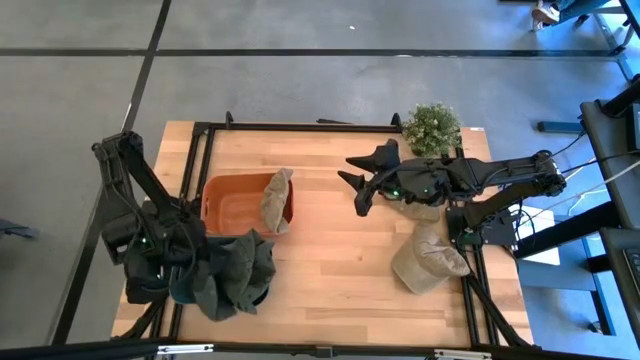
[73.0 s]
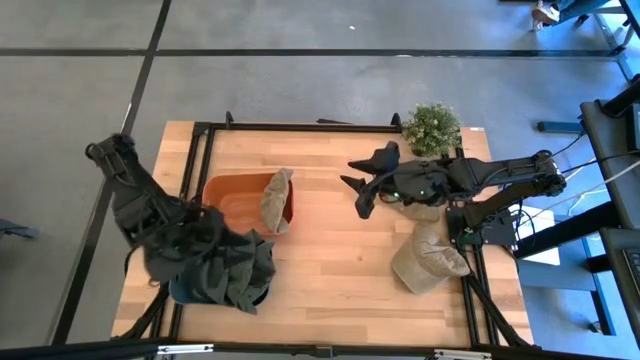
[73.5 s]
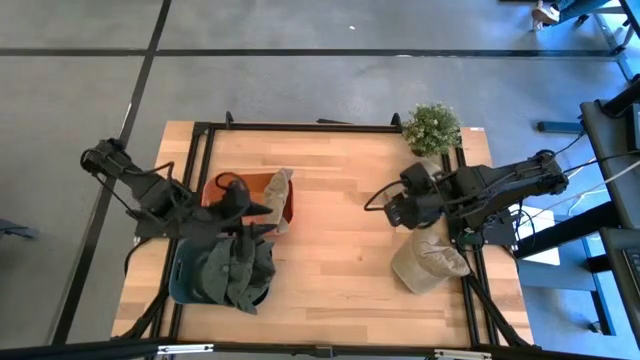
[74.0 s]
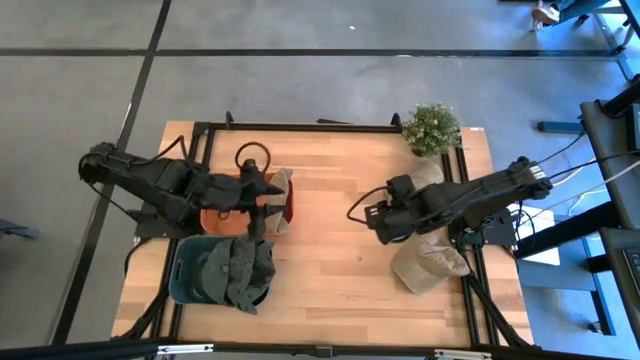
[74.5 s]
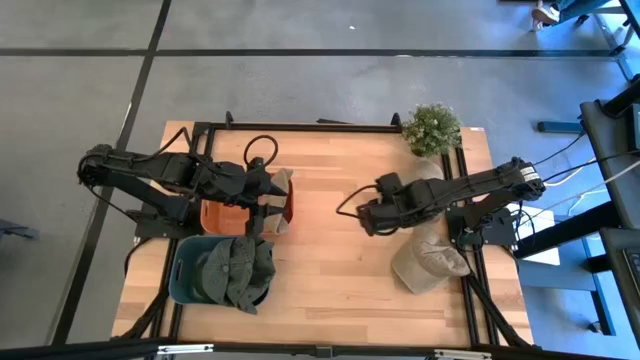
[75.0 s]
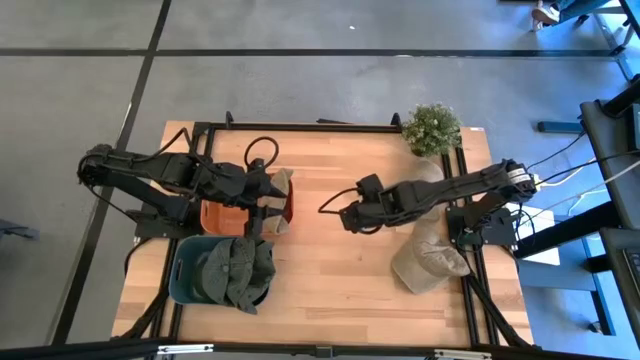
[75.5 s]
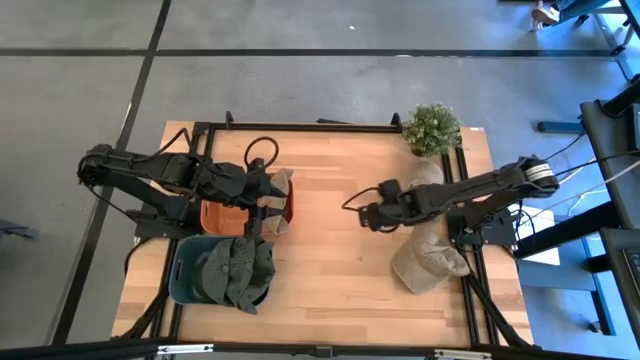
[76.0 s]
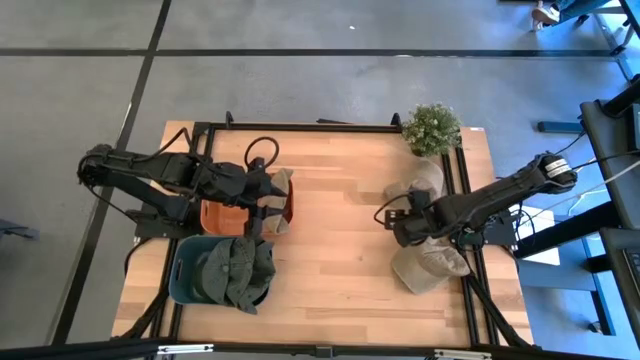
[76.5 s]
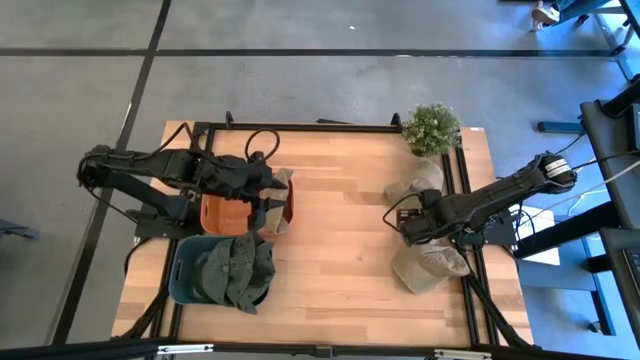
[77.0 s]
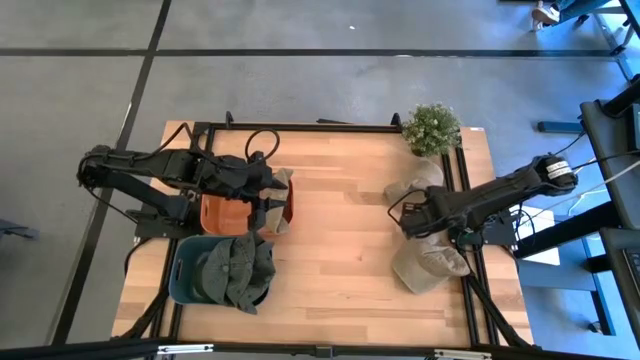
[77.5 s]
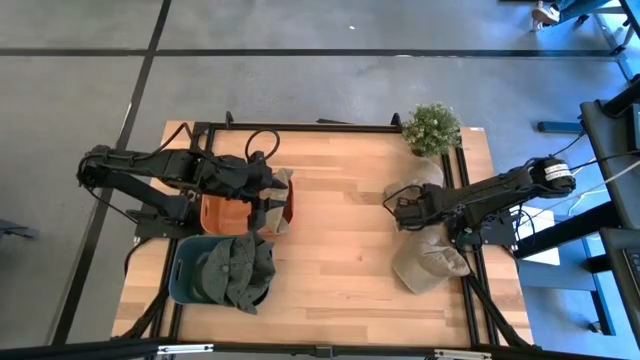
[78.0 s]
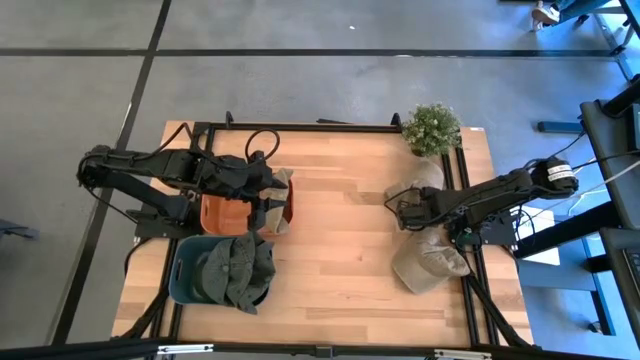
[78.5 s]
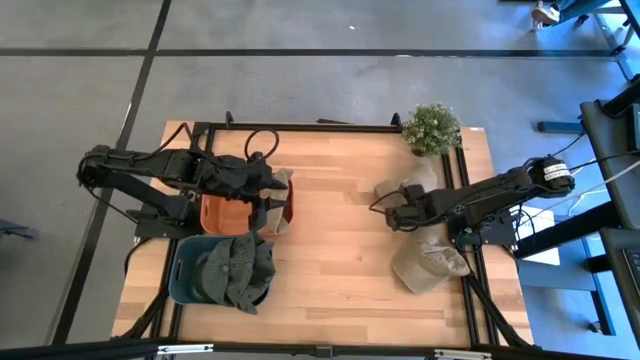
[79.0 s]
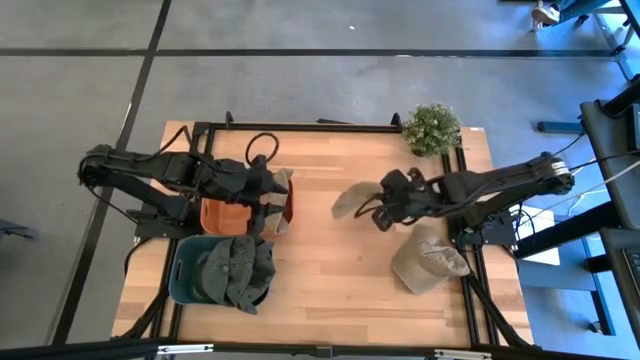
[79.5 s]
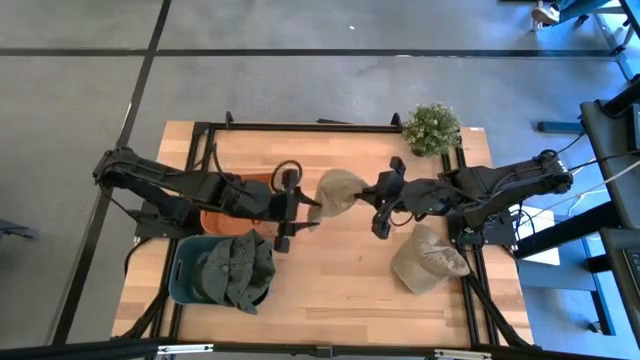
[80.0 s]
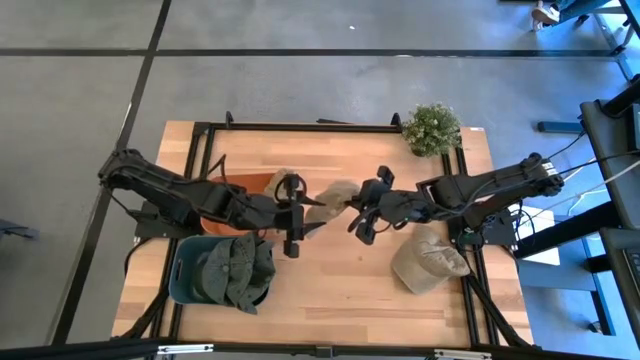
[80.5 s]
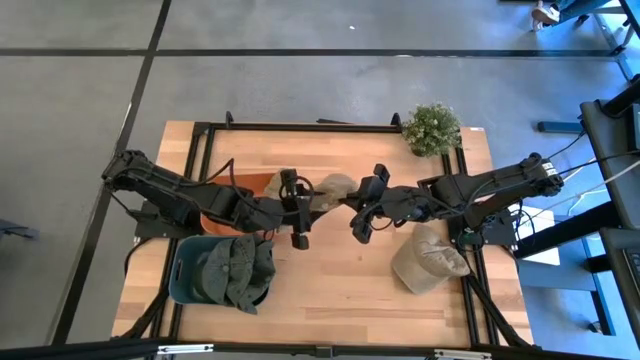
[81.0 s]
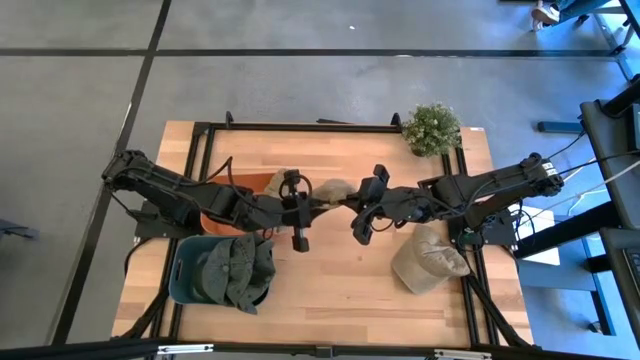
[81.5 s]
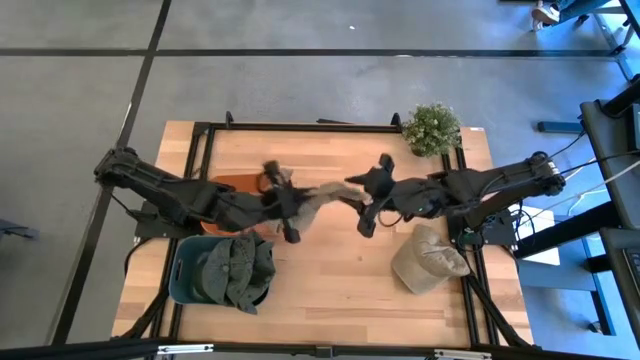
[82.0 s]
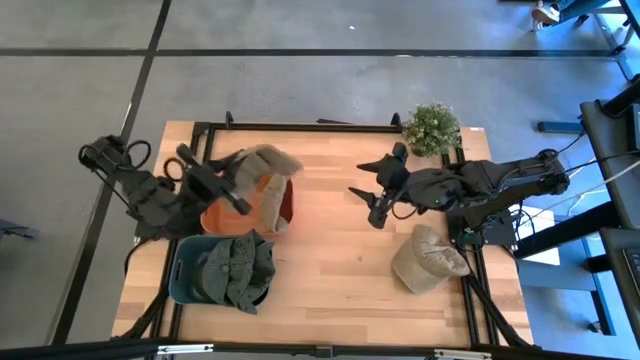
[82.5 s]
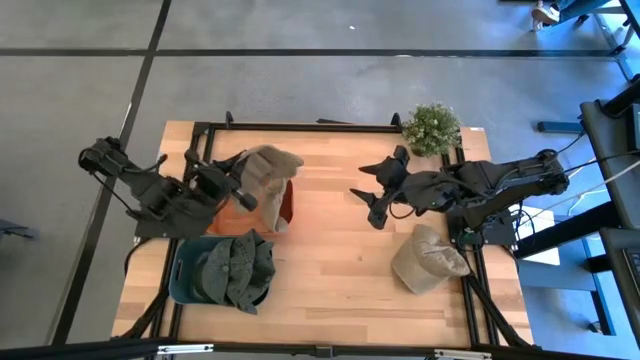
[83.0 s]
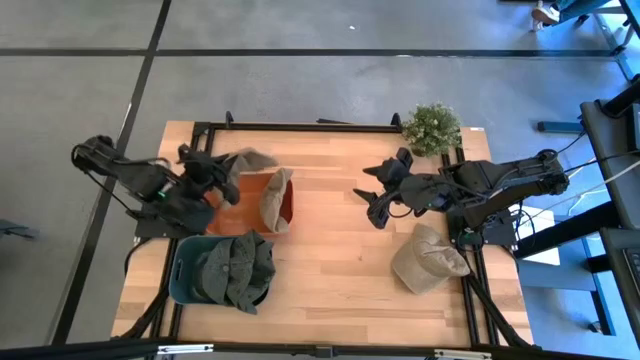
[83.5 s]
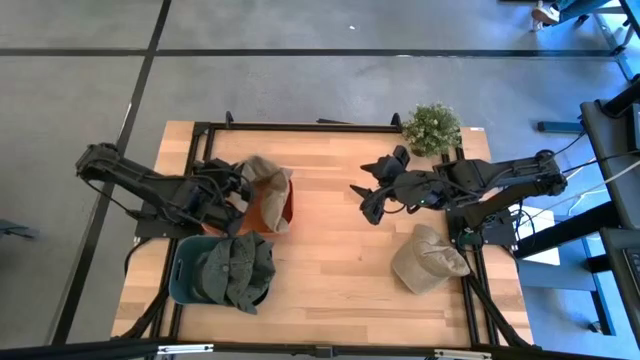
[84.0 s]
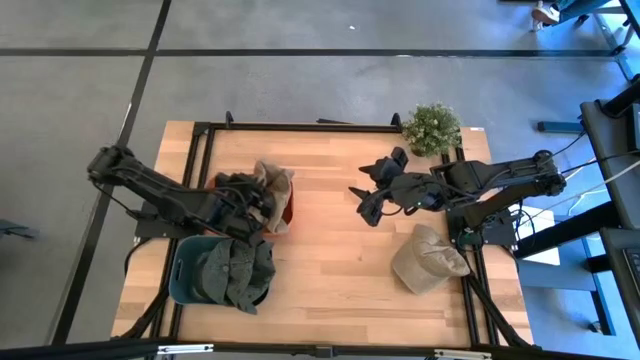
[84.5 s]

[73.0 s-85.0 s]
Task: Pick & Place hat
Put the top brown cap into the orange bin

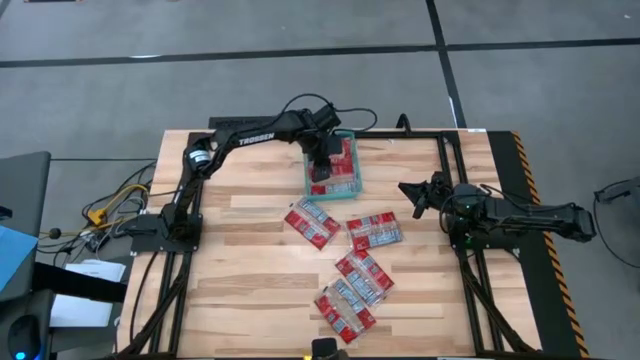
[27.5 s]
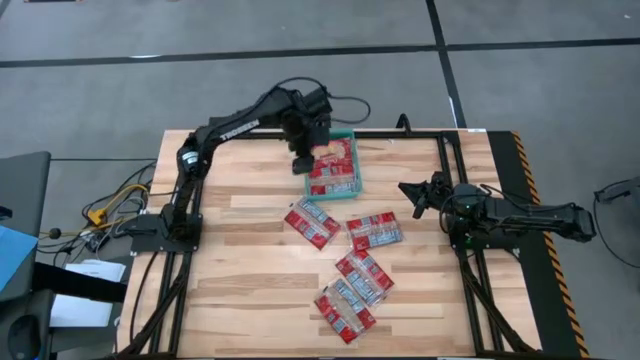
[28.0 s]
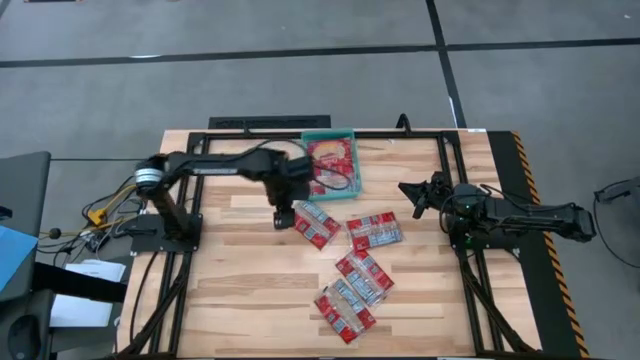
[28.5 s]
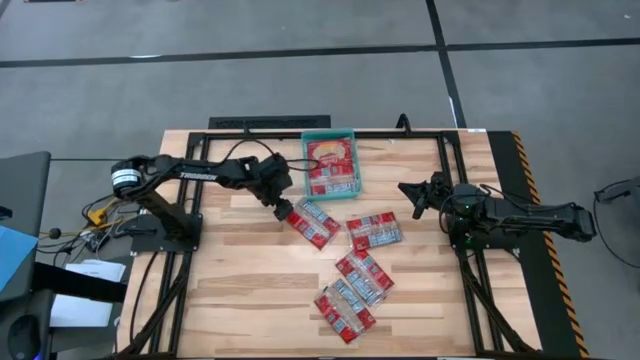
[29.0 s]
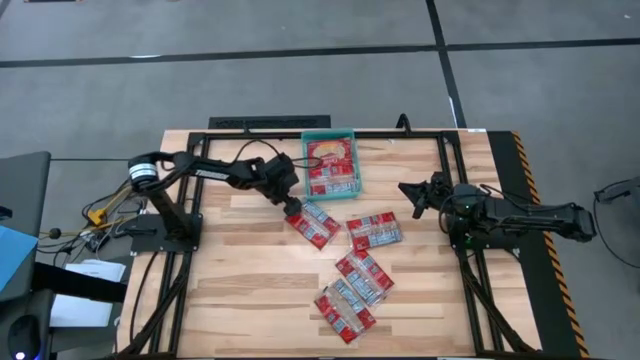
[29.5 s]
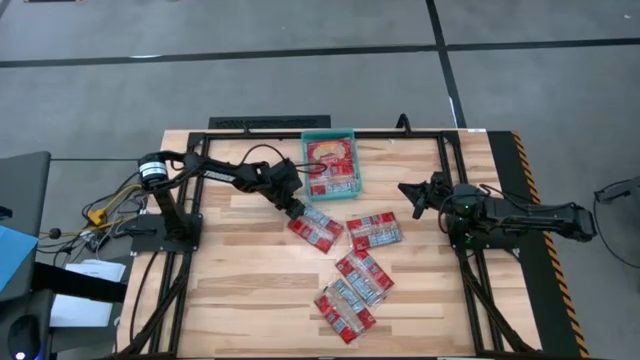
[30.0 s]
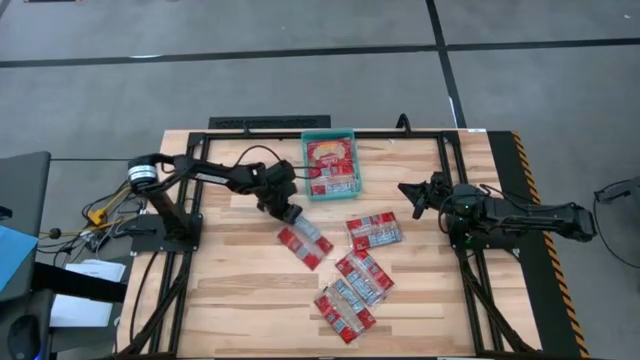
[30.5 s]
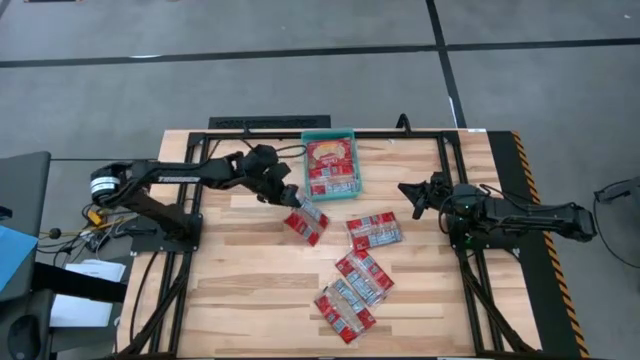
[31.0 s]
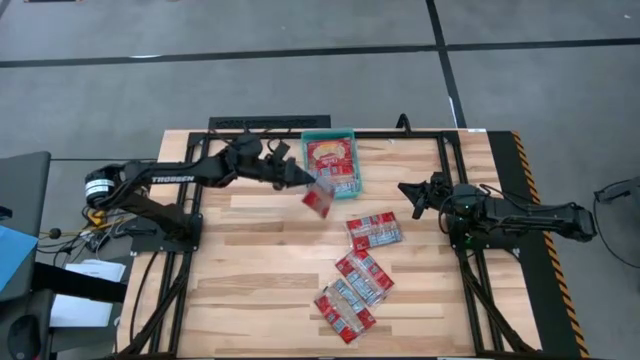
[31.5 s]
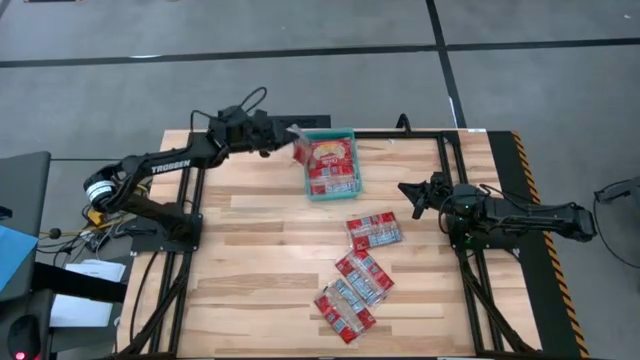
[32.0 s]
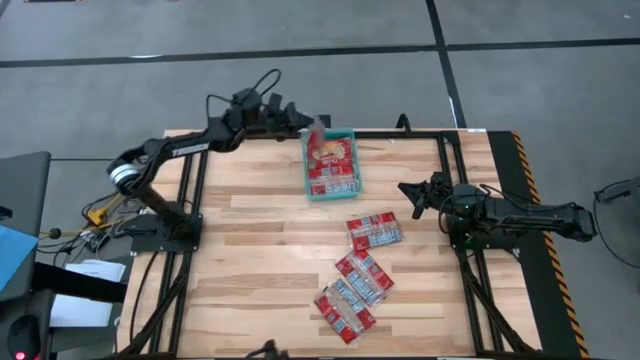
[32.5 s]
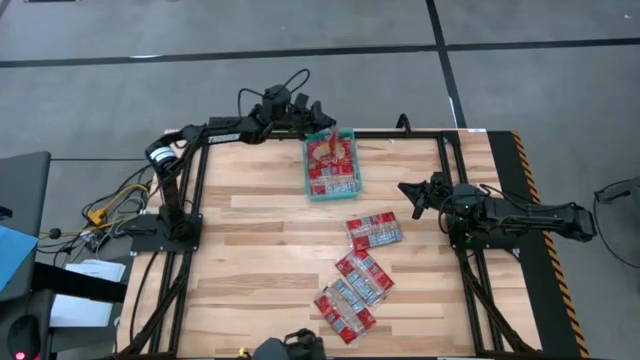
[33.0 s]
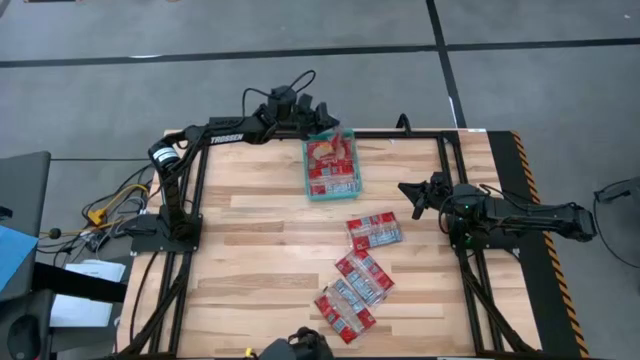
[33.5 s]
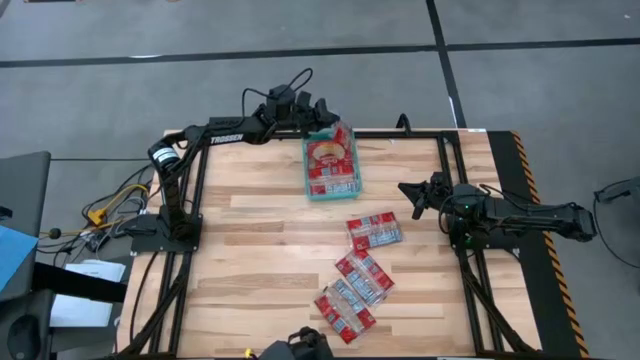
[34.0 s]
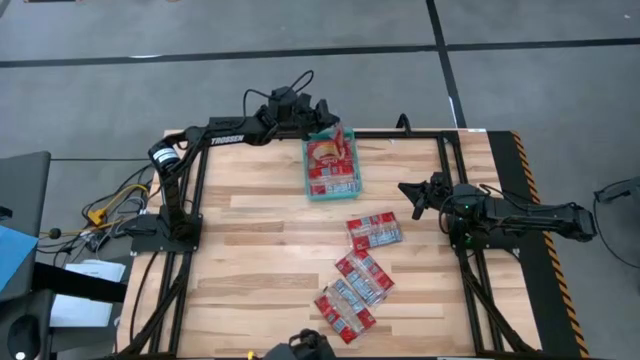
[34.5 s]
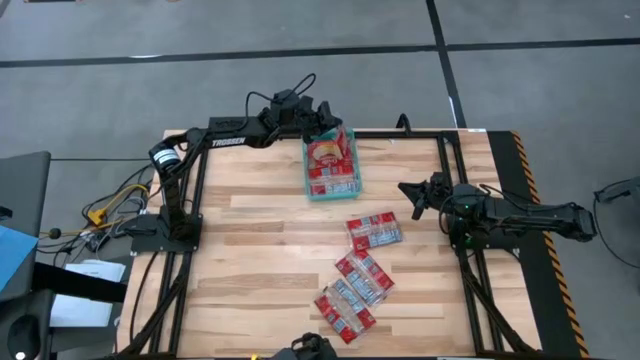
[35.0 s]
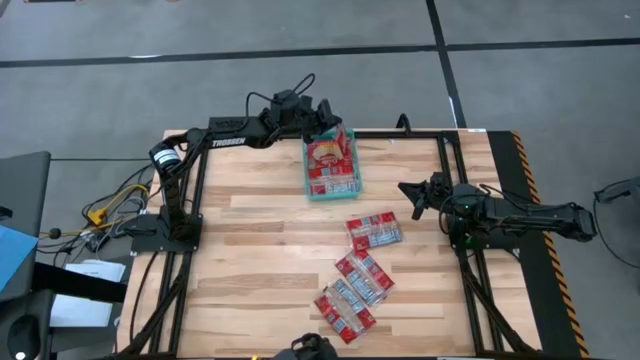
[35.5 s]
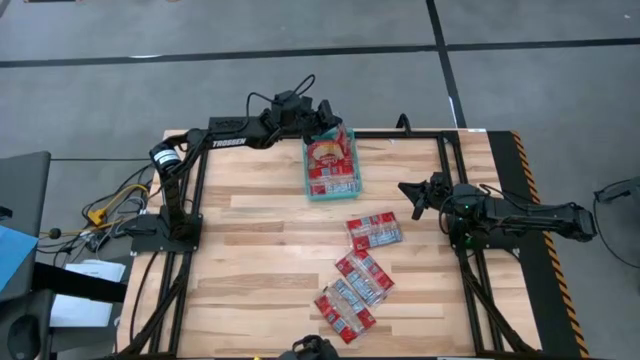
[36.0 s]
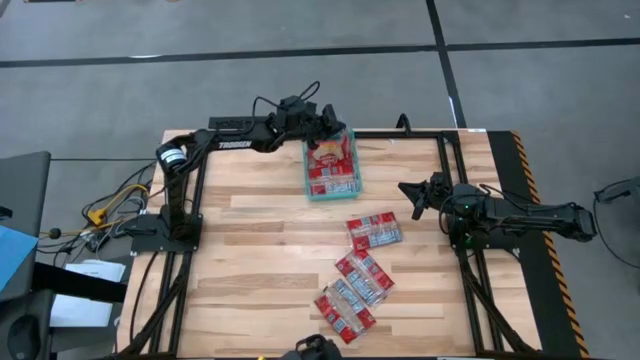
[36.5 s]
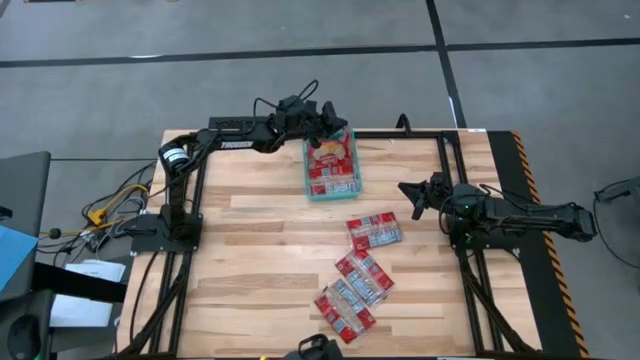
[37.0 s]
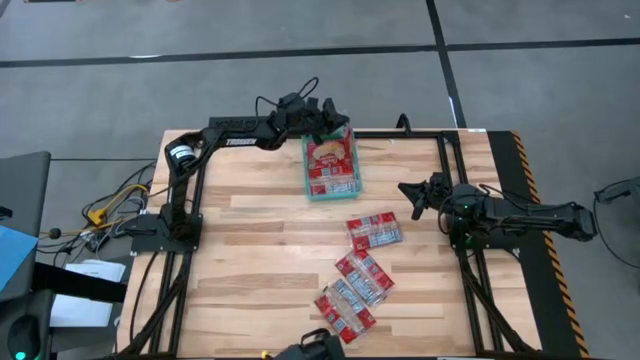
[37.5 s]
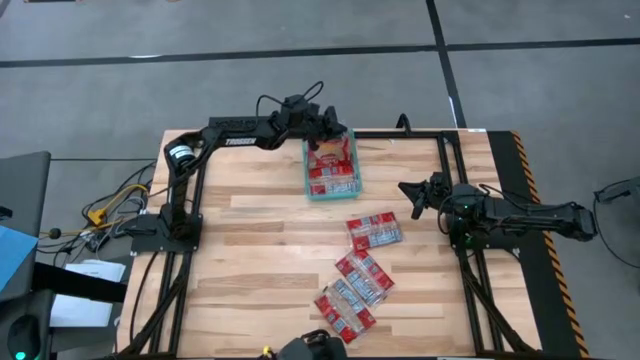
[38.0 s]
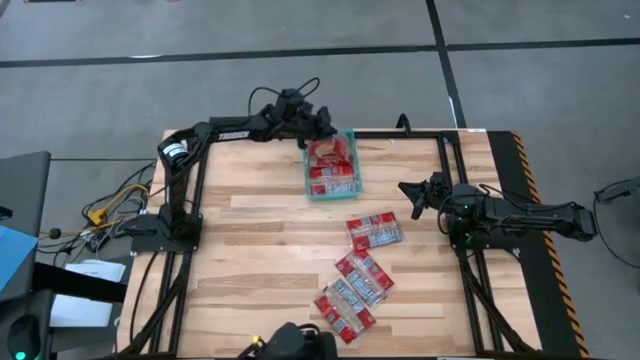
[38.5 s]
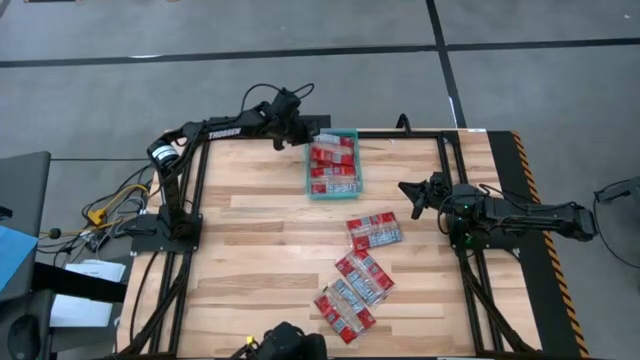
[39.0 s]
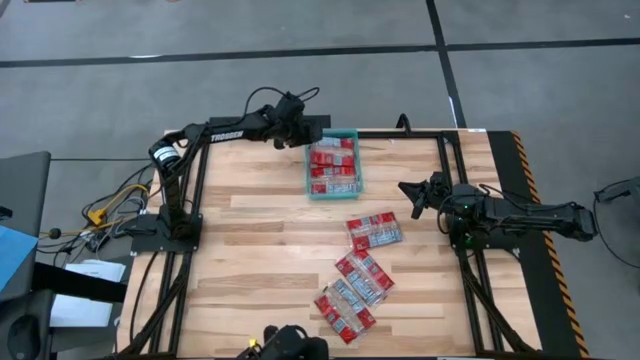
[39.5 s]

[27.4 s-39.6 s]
Task: Sort popcorn bags into baskets
Put the red popcorn bag into the green bin
